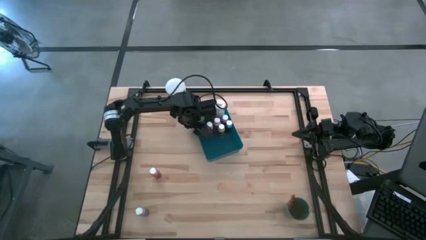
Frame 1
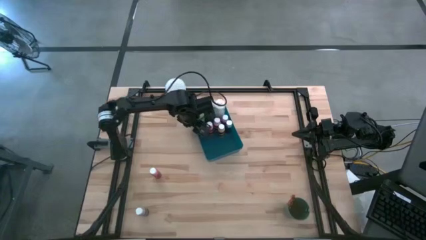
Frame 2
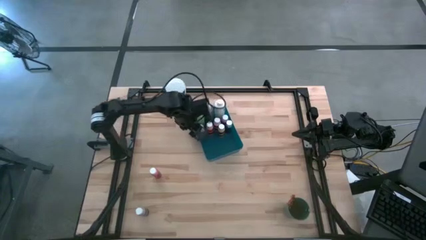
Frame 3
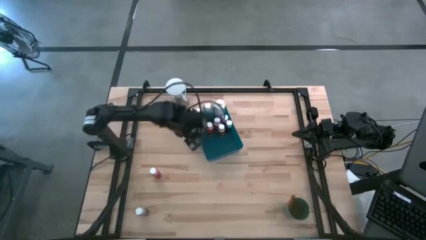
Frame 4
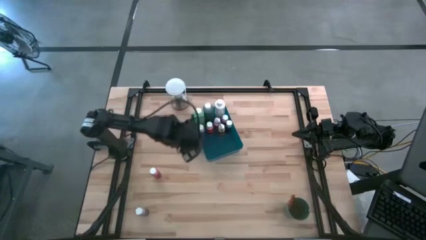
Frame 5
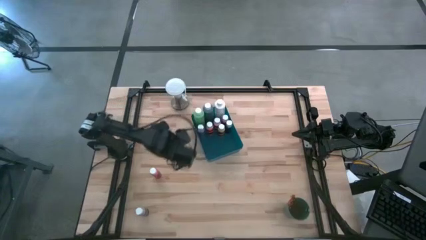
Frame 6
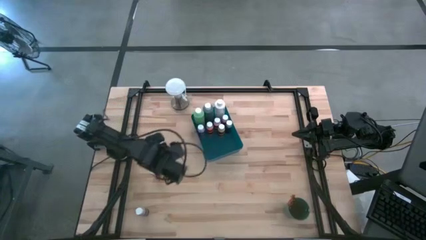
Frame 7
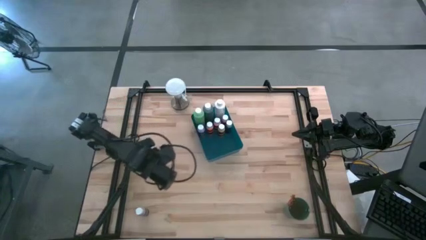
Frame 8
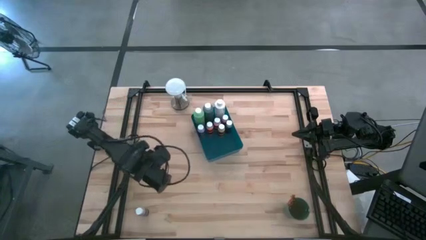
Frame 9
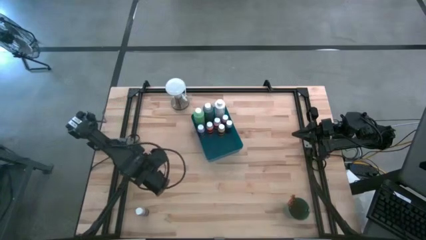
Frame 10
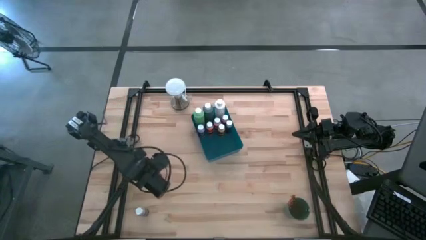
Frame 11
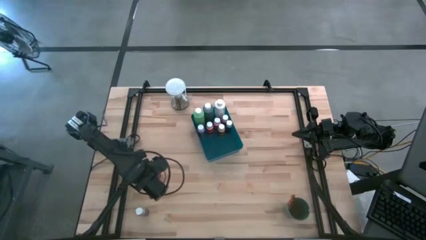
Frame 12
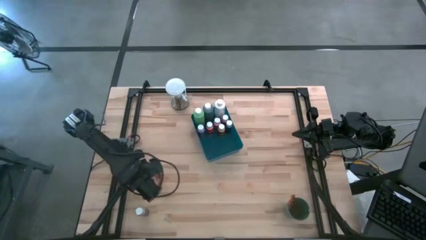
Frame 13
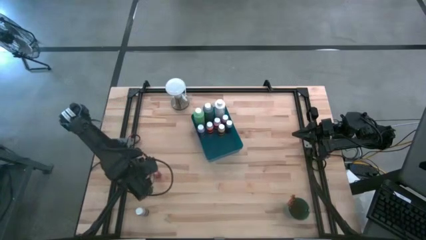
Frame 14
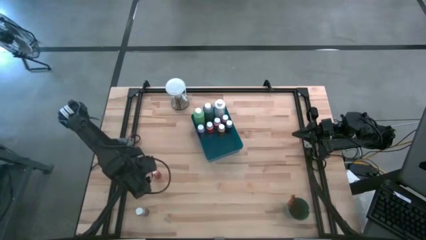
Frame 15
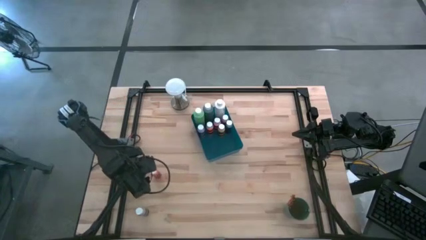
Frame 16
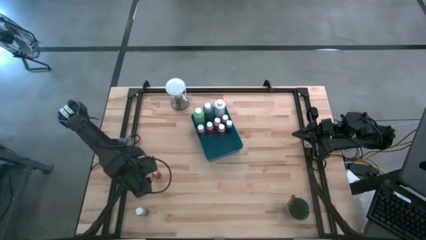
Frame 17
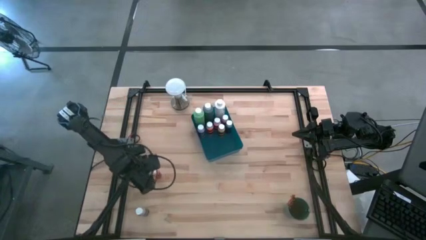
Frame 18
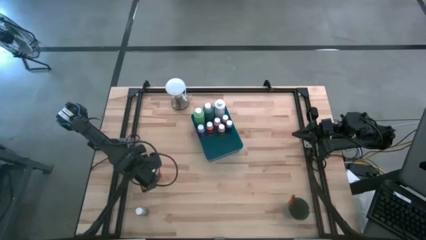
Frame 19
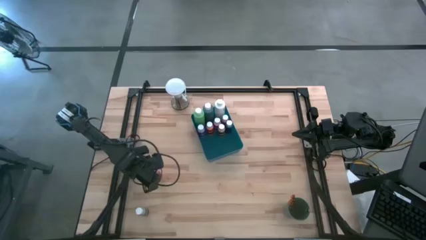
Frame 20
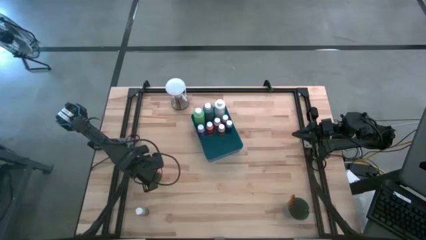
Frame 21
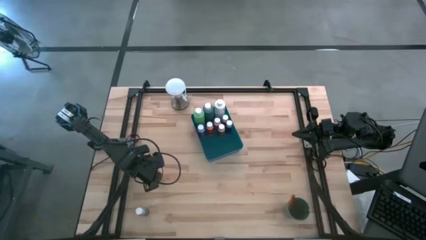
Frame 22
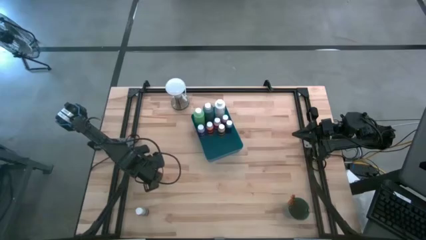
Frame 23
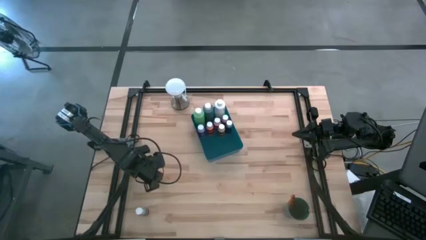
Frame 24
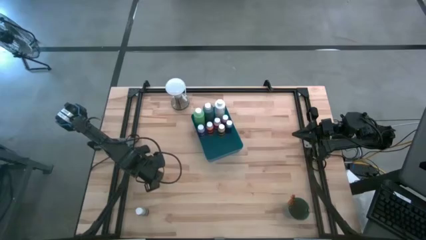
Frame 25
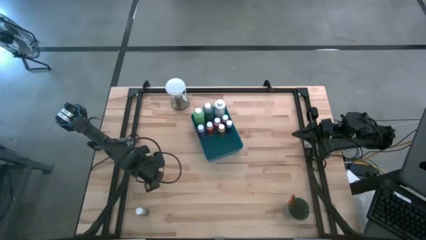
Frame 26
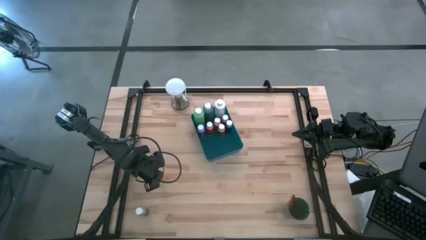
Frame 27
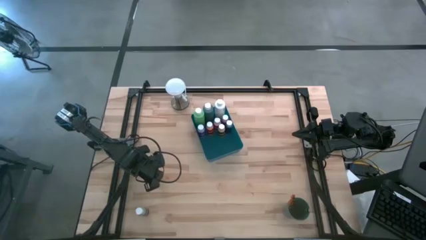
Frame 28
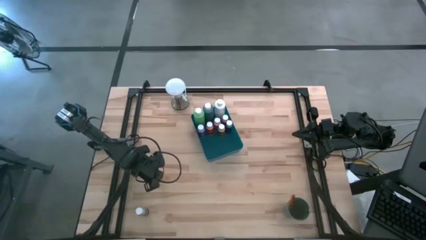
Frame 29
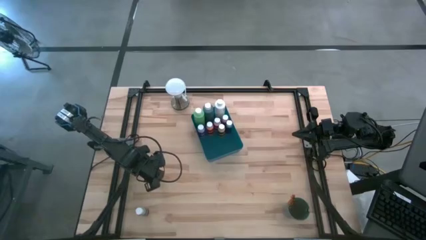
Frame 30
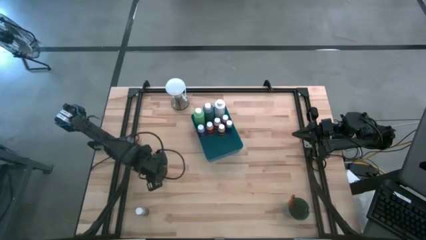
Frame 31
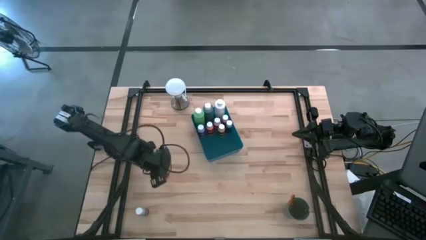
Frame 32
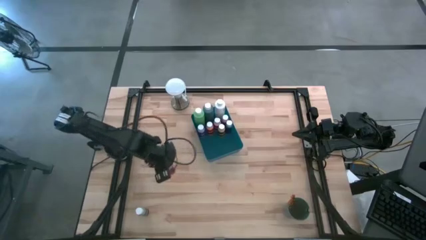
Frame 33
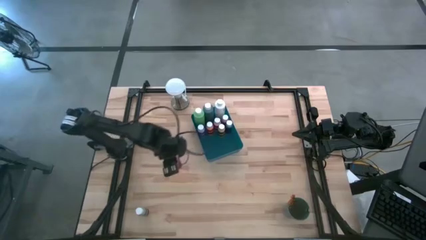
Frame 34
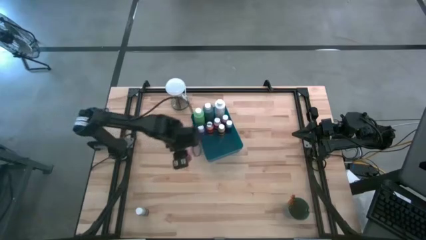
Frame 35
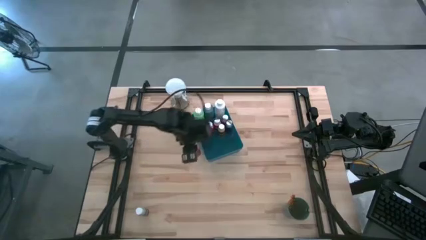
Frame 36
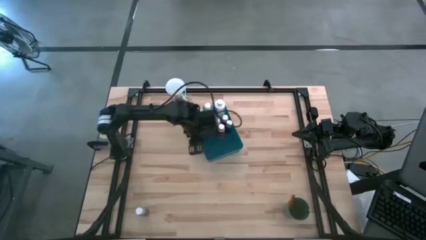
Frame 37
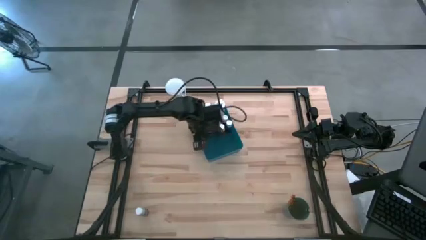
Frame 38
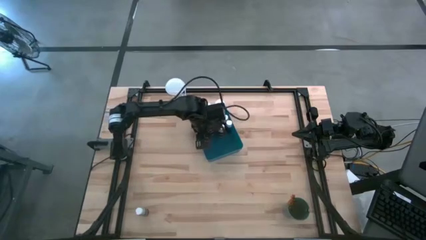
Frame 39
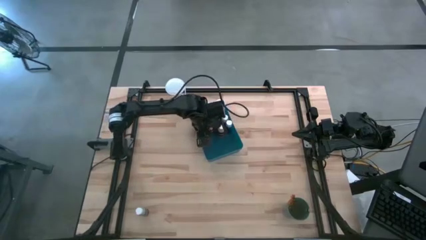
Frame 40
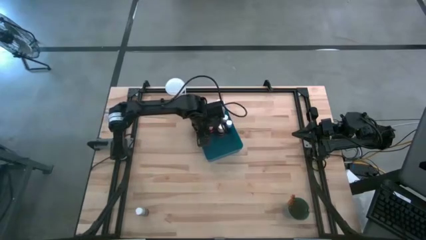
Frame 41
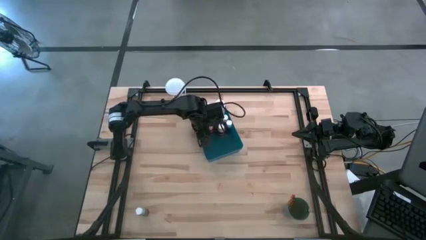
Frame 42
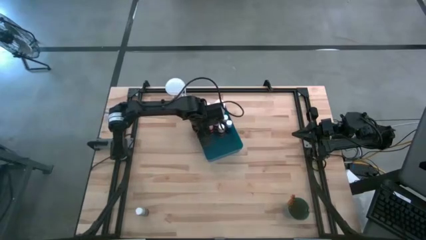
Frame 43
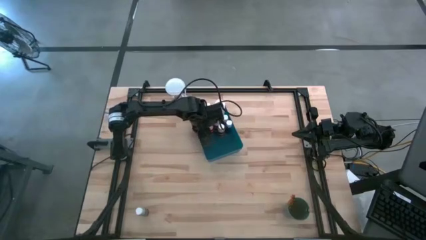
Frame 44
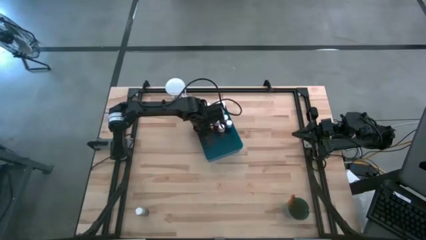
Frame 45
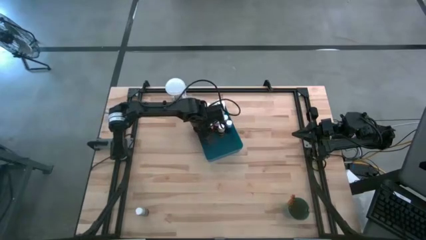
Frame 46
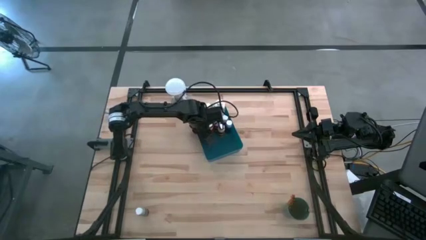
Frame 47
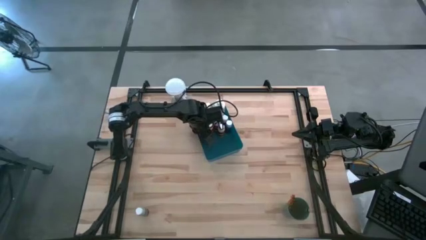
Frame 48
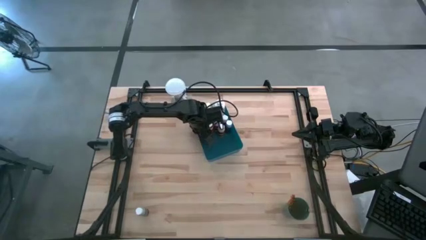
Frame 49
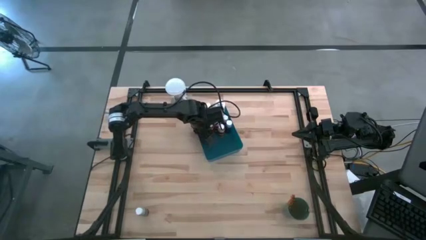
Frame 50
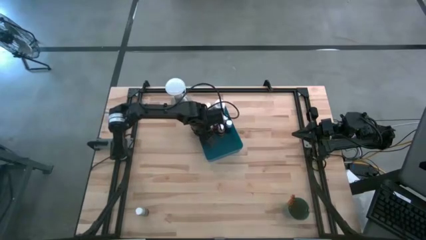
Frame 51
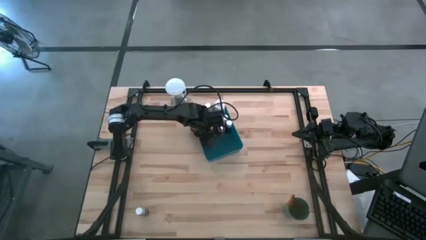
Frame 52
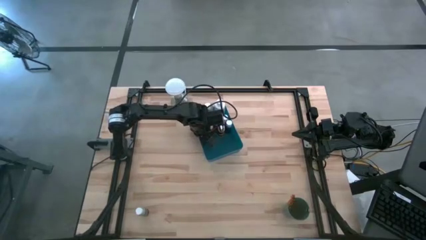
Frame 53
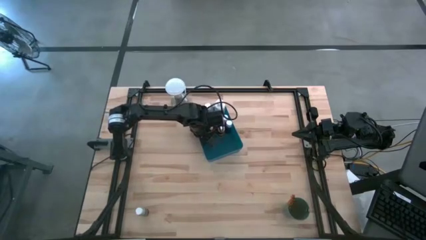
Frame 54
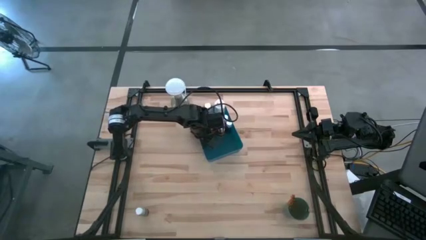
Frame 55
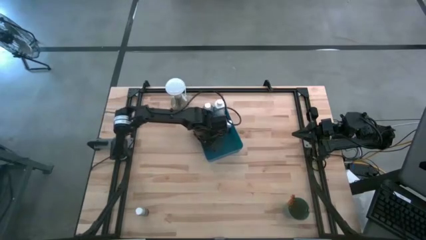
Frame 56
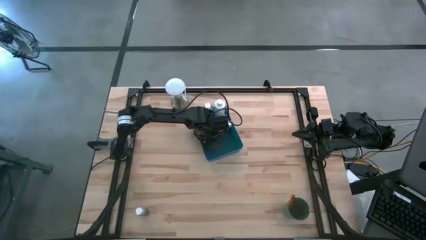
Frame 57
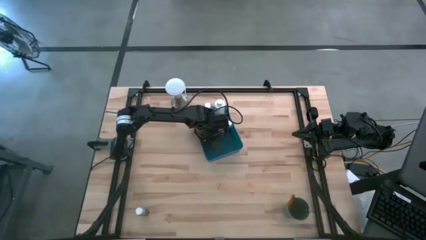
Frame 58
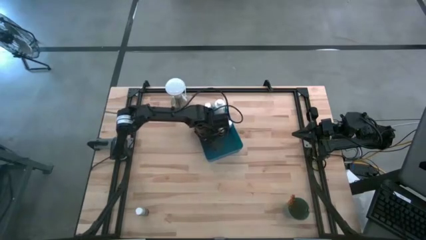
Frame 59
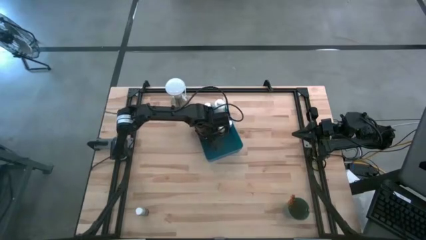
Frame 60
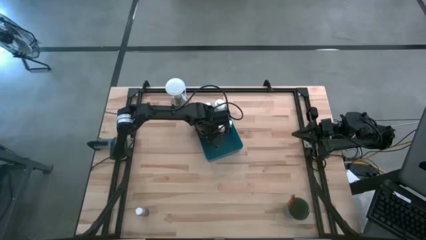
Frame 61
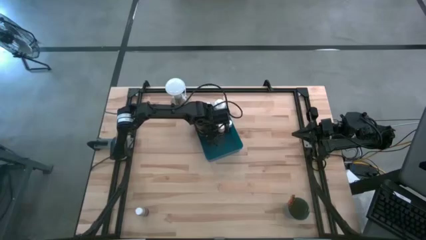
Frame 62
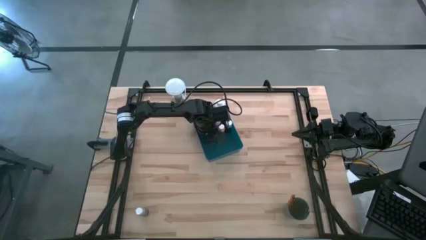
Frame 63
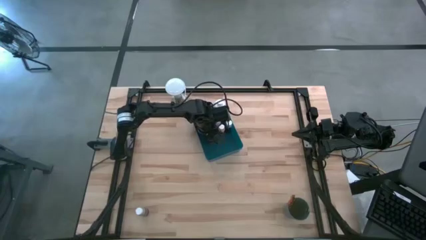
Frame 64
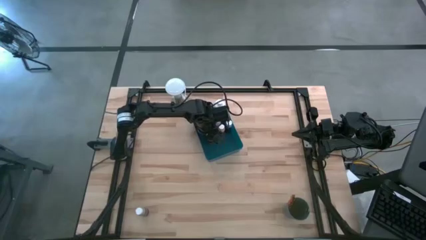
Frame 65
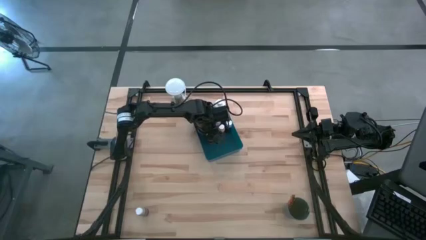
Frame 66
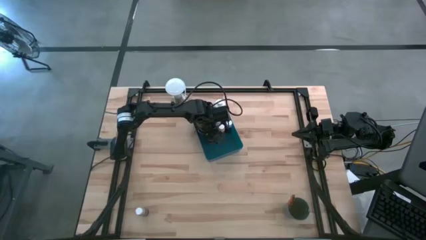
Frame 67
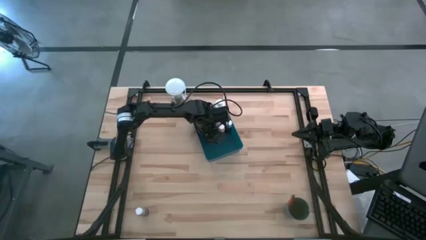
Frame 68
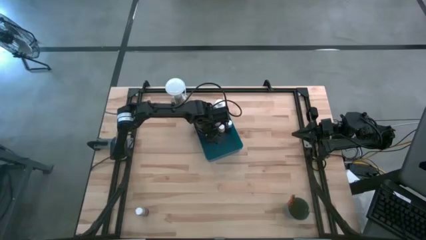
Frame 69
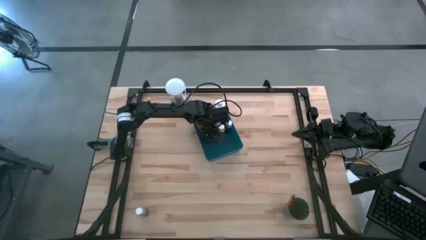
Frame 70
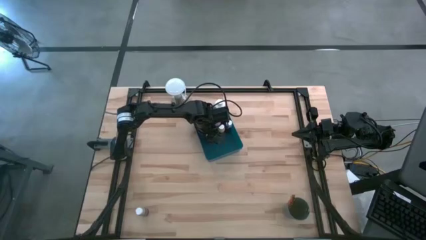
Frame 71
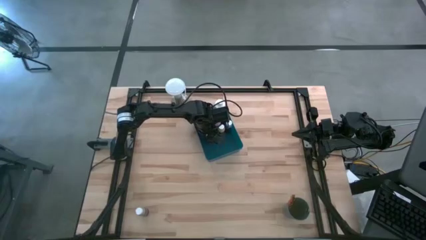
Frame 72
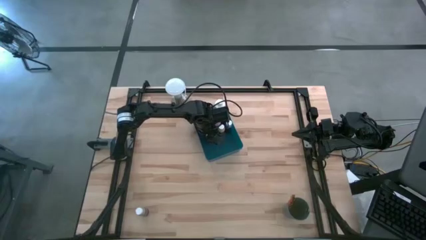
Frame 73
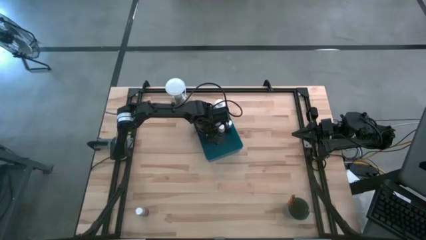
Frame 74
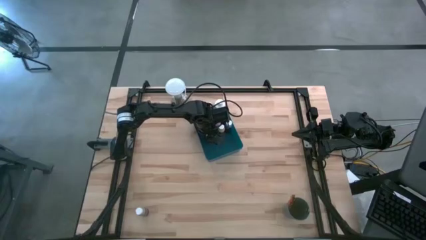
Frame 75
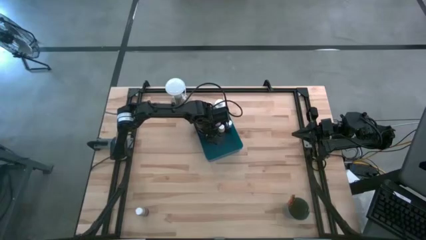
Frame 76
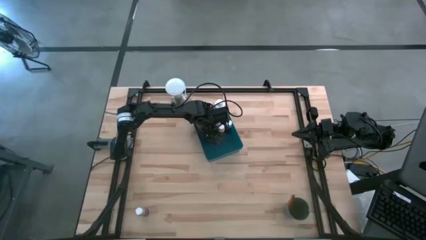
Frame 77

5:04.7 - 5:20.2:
Task: Pick & Place Paint Supplies
Put the orange paint bottle into the blue bin aligned with the other orange paint bottle
